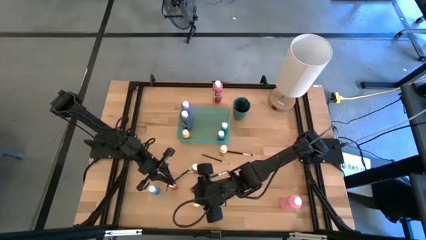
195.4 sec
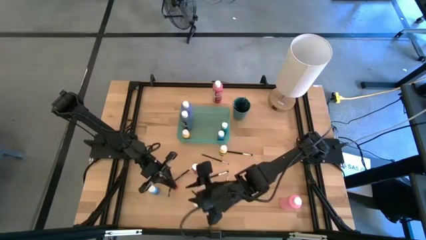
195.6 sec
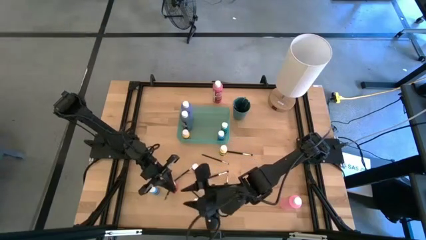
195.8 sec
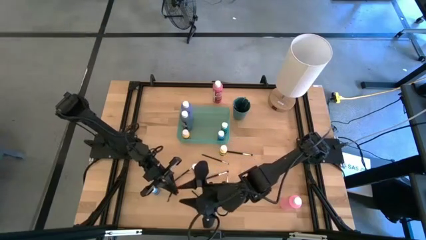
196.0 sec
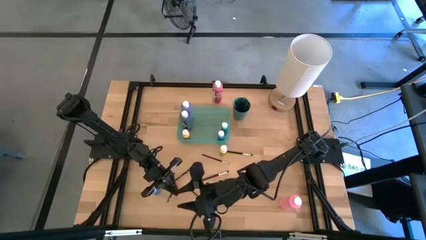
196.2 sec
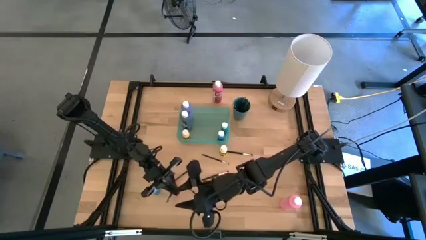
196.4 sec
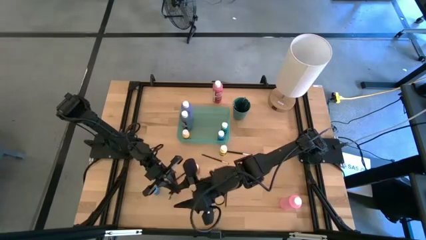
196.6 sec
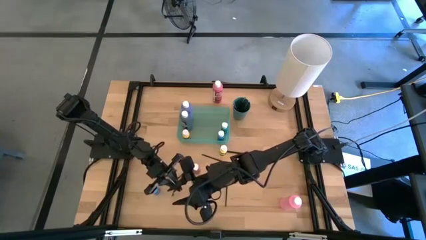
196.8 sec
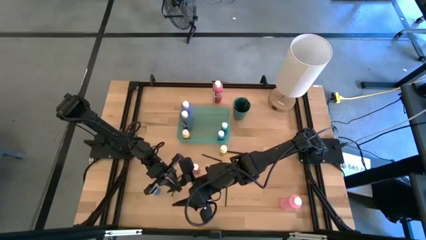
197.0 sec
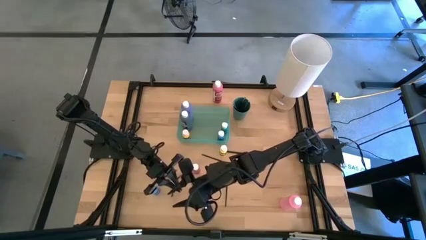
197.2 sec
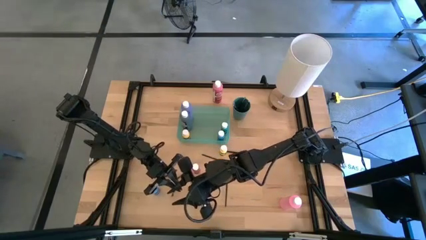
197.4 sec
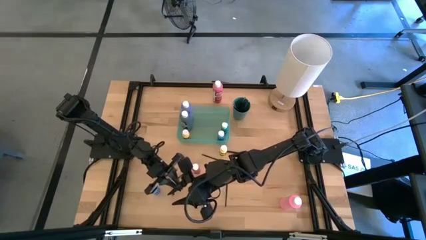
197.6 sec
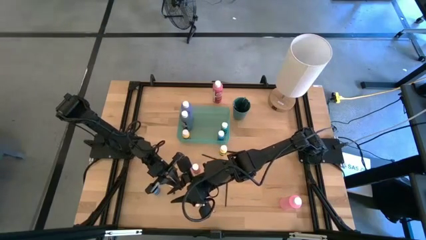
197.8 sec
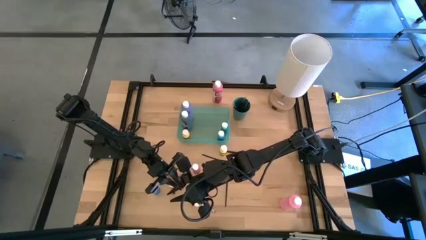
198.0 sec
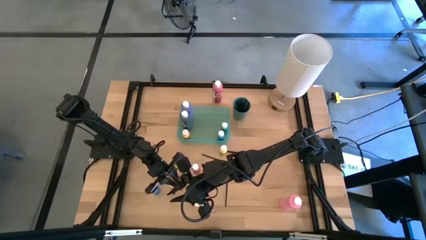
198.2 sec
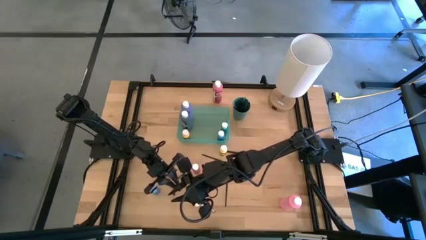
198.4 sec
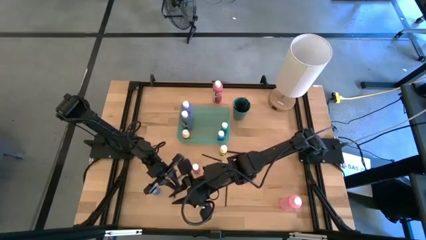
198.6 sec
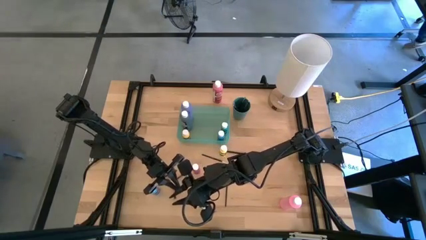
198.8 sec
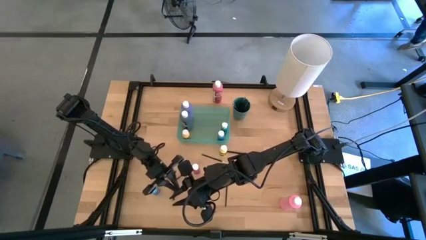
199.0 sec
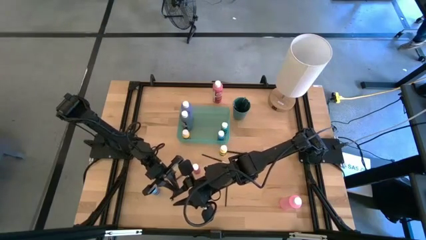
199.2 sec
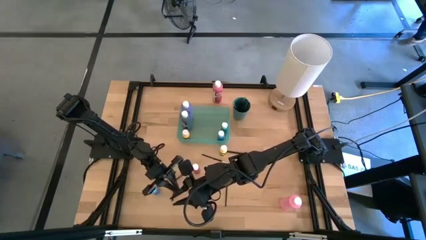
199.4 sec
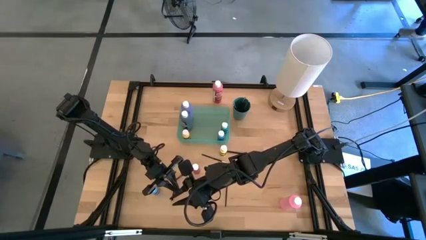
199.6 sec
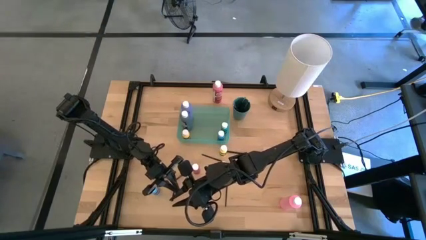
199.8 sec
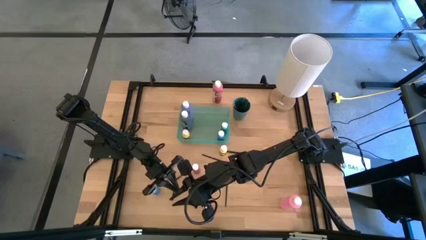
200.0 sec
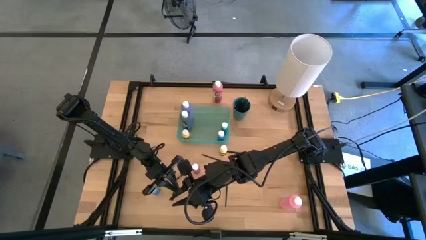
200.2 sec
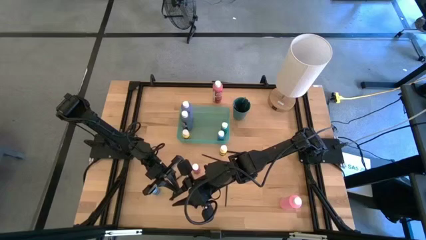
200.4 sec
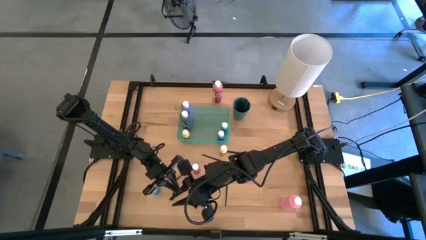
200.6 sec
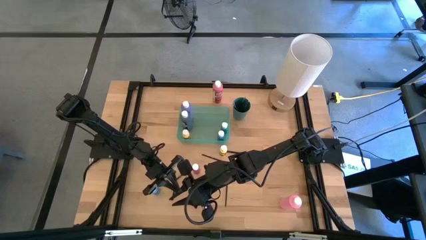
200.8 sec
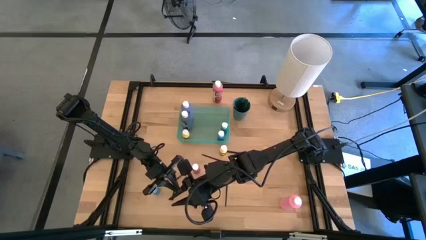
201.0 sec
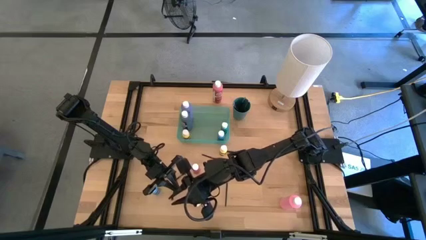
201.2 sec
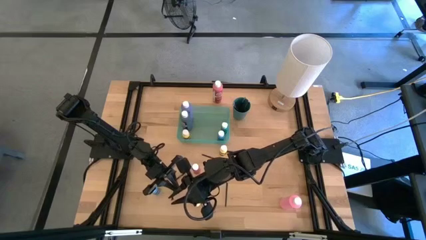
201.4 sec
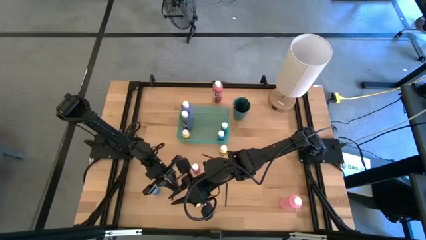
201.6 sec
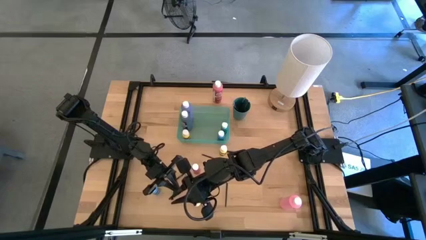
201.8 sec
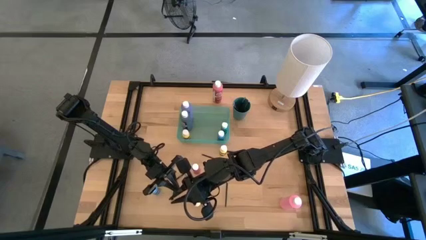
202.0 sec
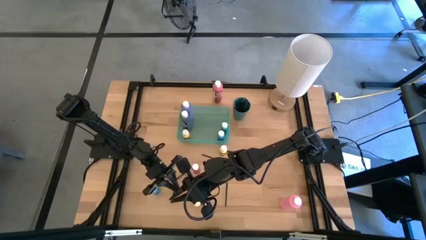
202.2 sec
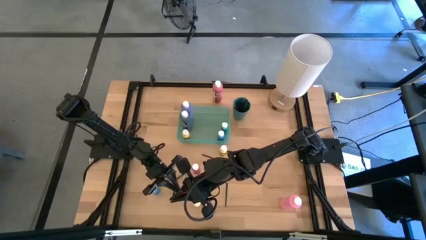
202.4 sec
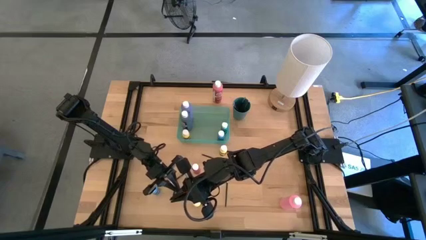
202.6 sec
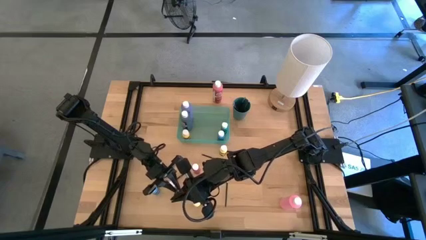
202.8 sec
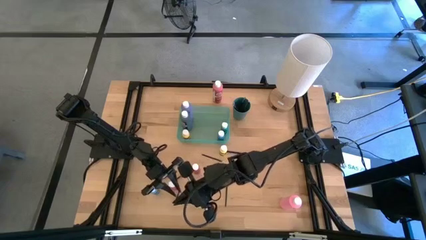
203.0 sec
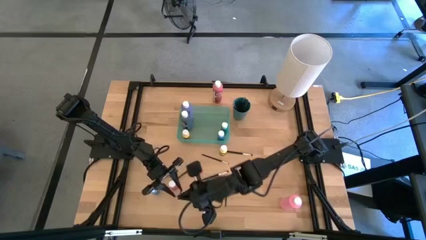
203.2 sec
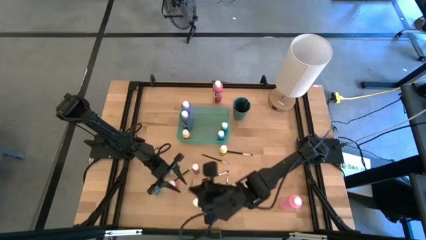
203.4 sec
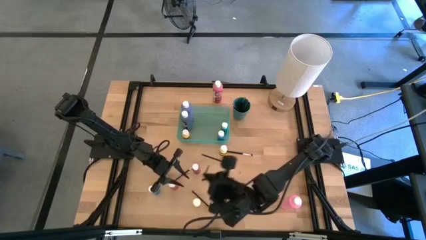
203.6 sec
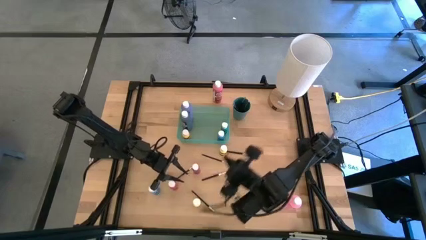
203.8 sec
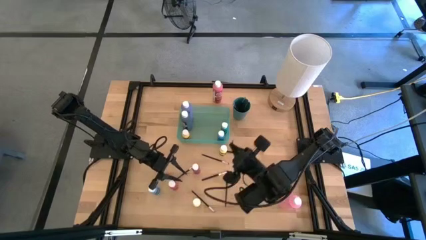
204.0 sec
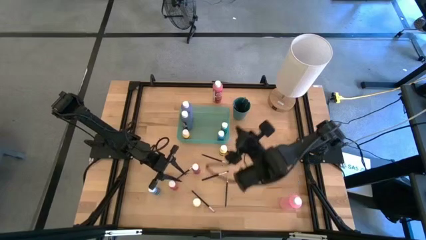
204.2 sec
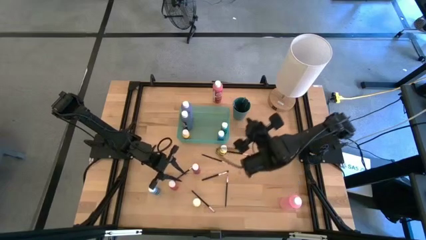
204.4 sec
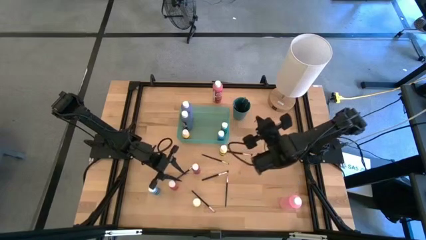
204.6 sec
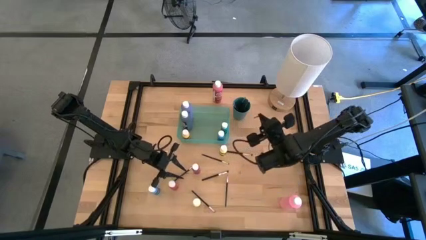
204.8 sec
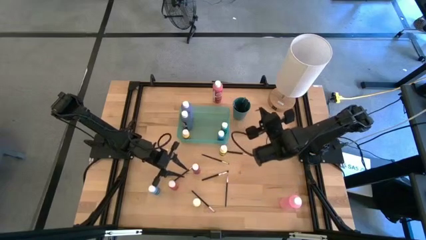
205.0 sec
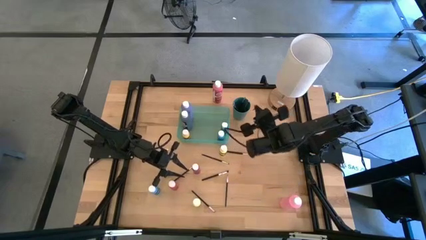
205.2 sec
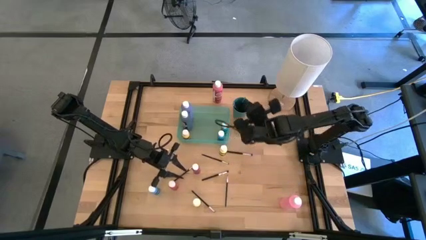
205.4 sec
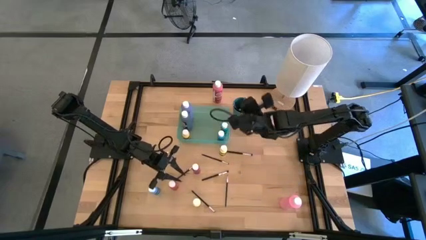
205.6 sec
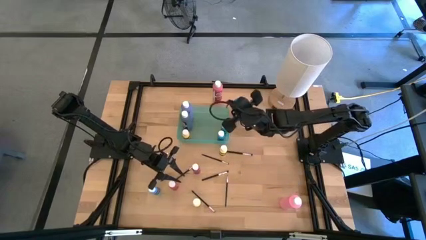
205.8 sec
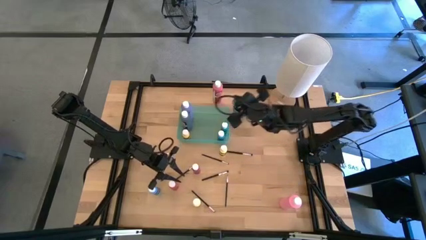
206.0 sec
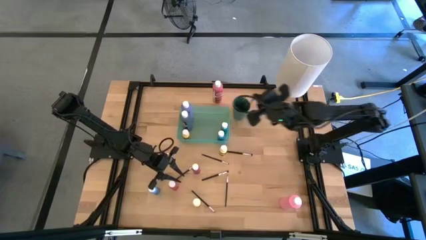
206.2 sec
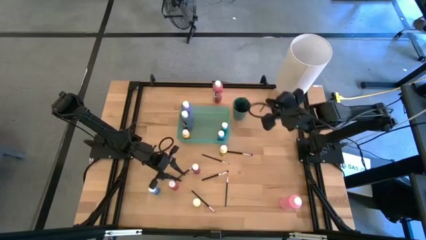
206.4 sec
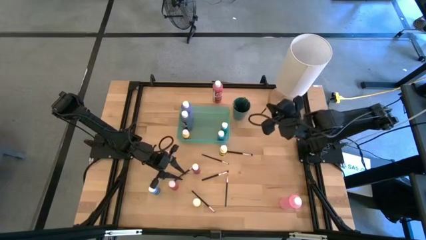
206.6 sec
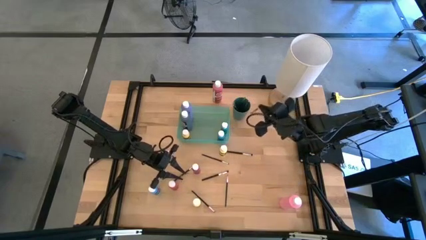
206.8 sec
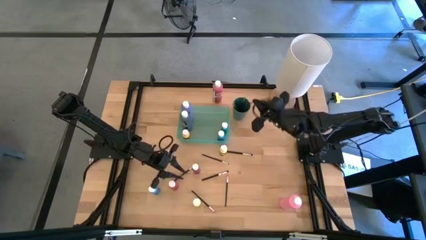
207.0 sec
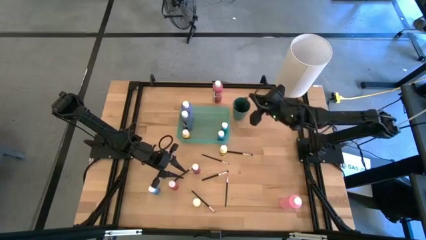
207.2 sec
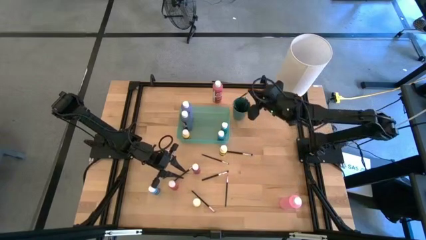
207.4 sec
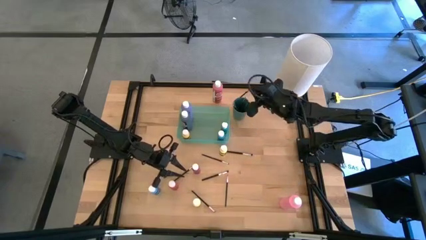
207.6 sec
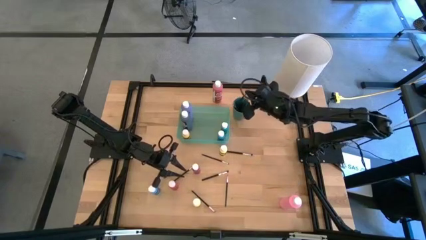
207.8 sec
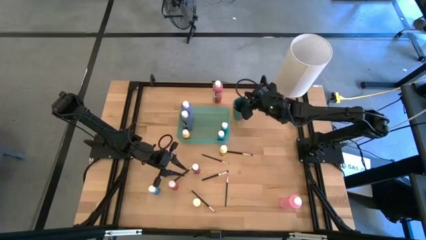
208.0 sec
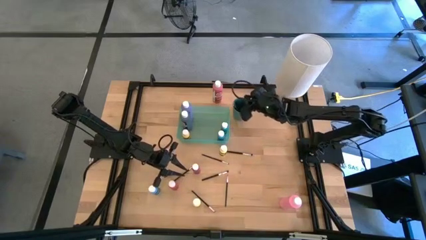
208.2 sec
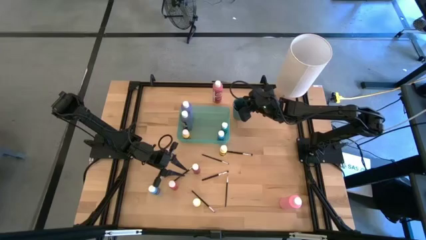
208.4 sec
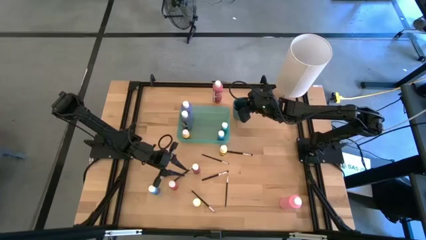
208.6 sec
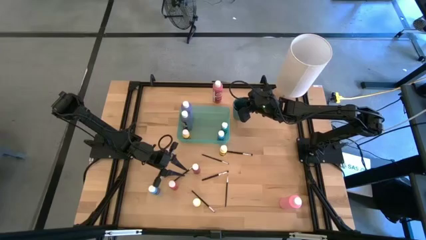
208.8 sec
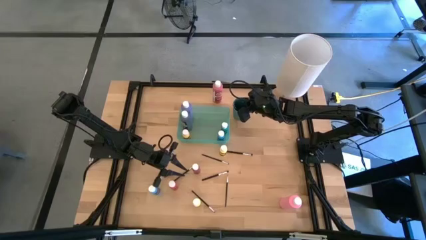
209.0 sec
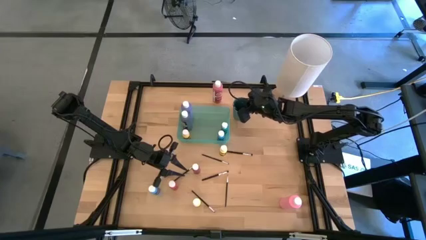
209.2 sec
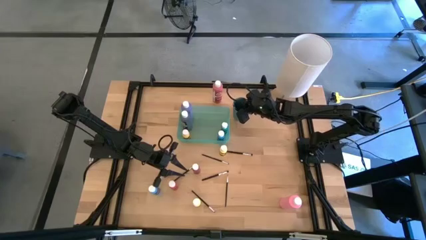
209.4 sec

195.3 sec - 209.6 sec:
Task: Pick & Place Paint Supplies
Put the black paint brush into the dark green cup
